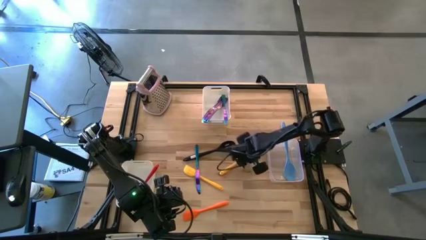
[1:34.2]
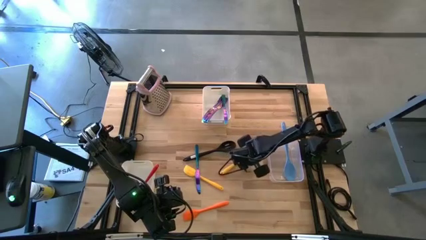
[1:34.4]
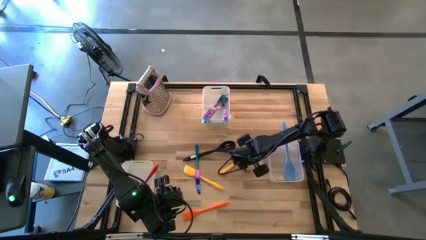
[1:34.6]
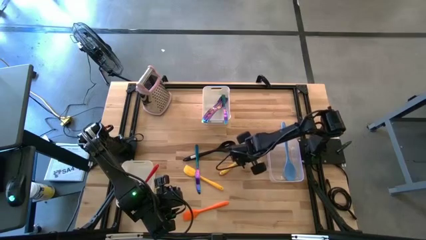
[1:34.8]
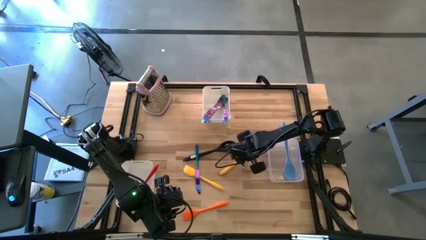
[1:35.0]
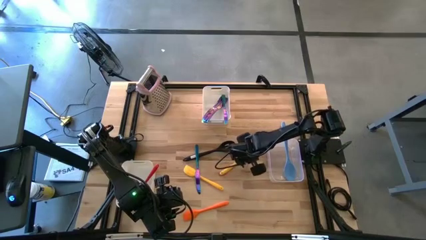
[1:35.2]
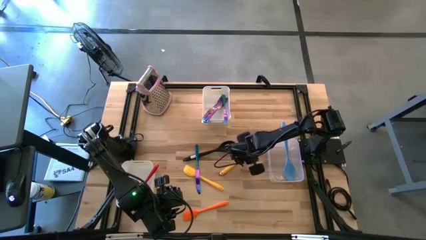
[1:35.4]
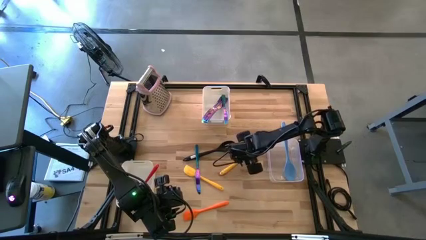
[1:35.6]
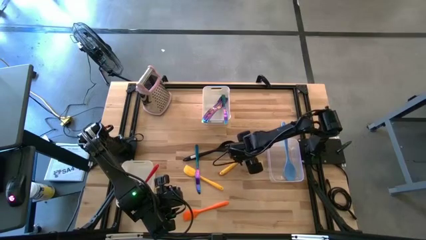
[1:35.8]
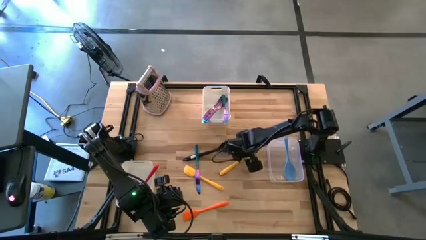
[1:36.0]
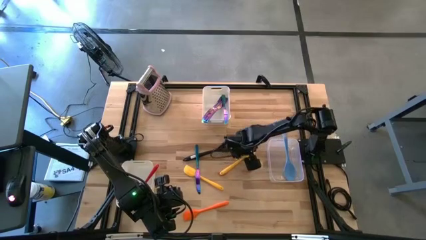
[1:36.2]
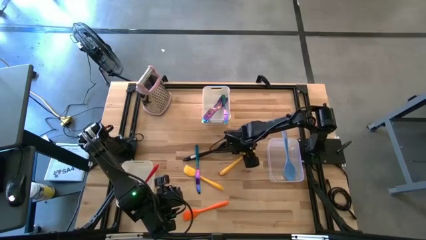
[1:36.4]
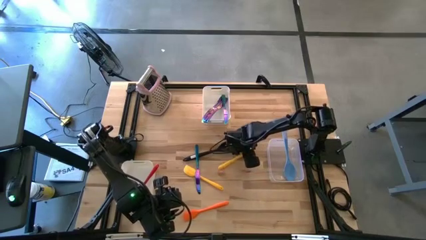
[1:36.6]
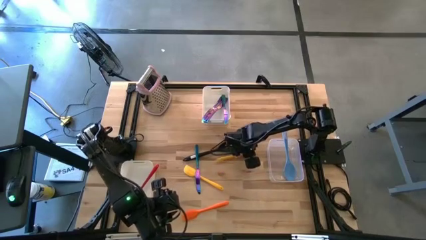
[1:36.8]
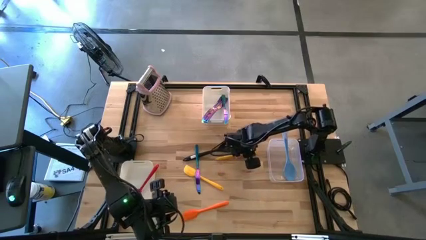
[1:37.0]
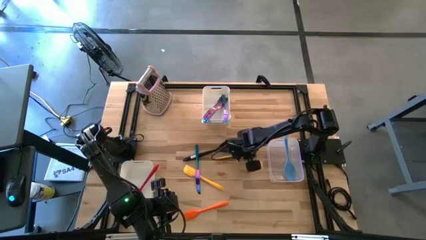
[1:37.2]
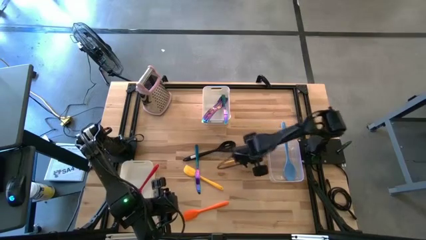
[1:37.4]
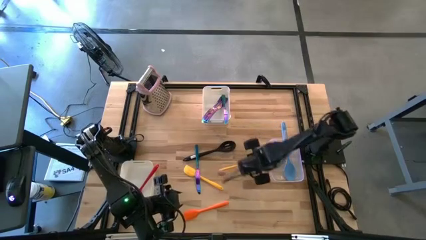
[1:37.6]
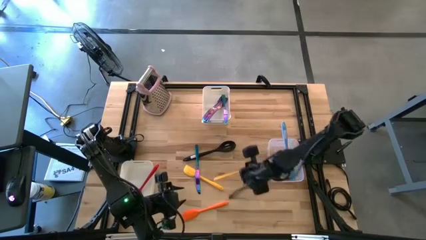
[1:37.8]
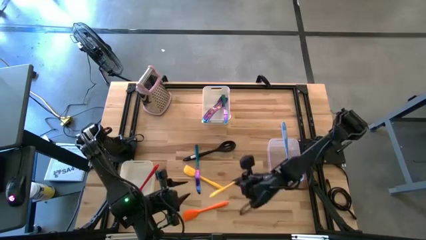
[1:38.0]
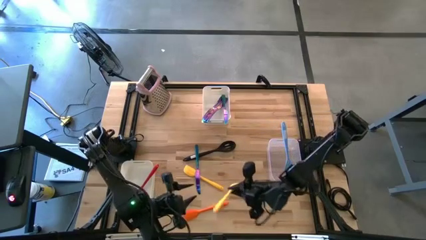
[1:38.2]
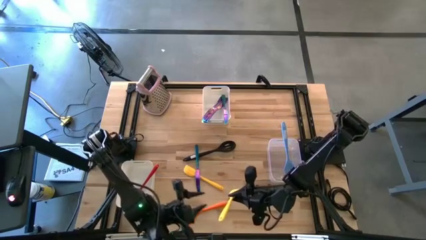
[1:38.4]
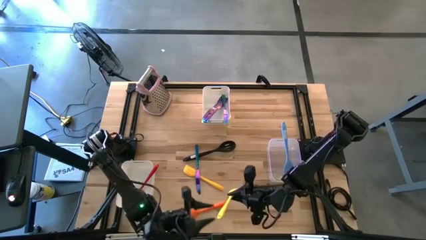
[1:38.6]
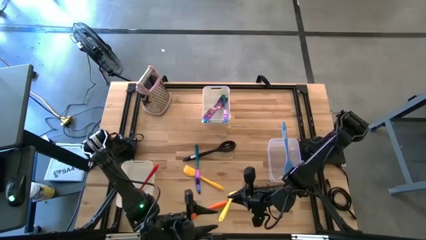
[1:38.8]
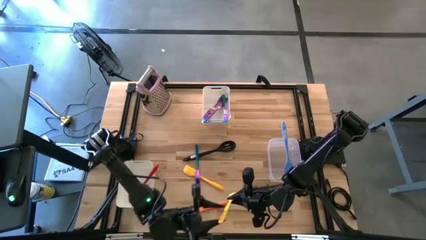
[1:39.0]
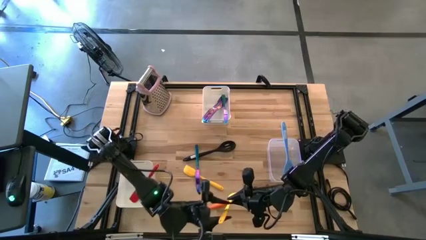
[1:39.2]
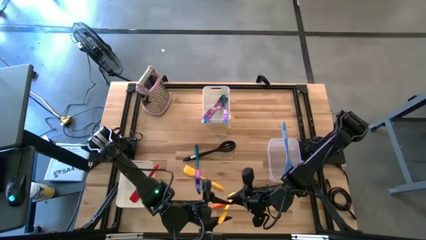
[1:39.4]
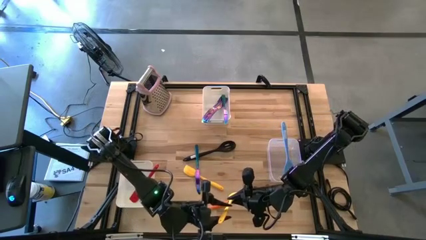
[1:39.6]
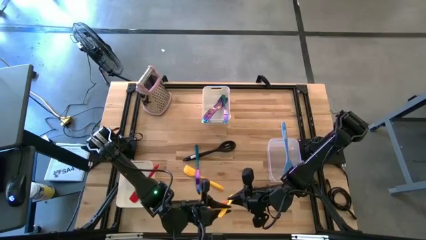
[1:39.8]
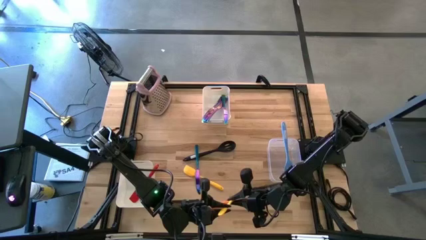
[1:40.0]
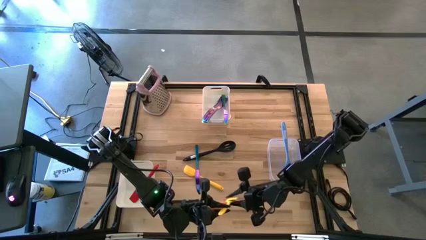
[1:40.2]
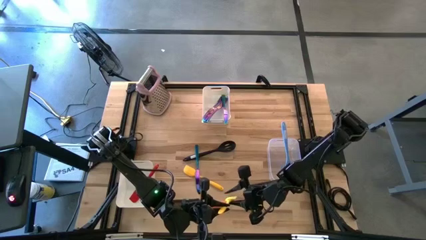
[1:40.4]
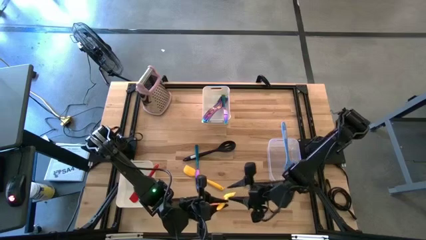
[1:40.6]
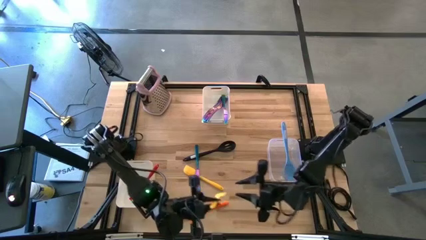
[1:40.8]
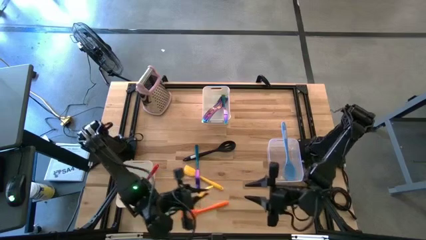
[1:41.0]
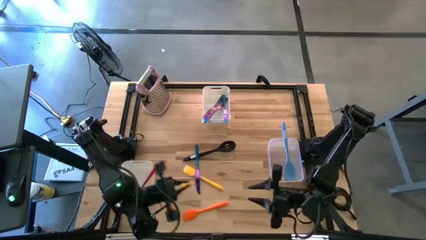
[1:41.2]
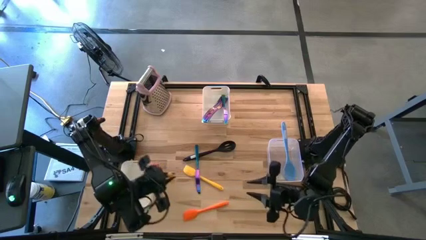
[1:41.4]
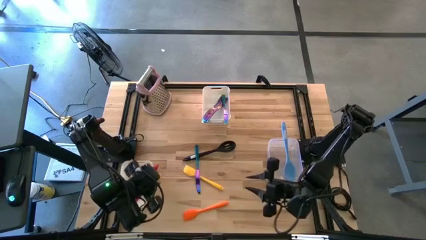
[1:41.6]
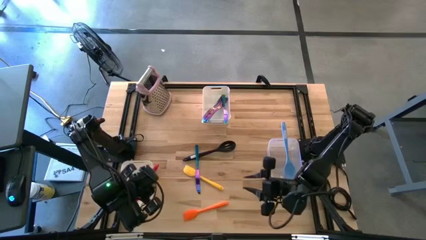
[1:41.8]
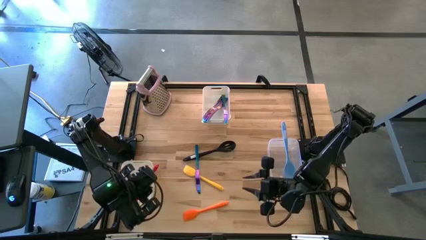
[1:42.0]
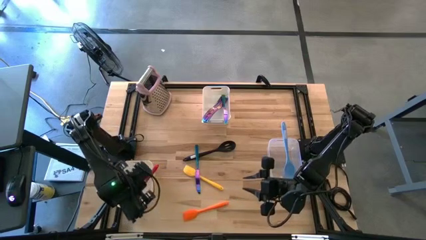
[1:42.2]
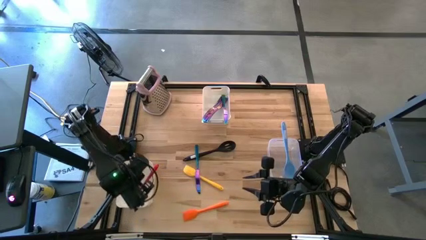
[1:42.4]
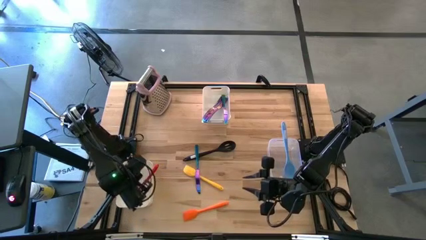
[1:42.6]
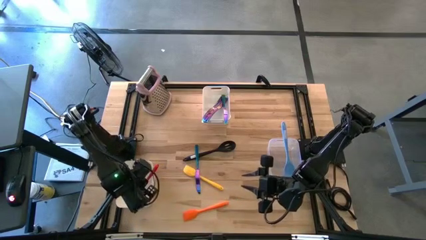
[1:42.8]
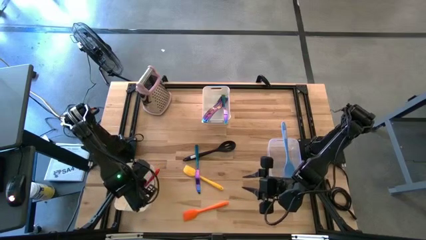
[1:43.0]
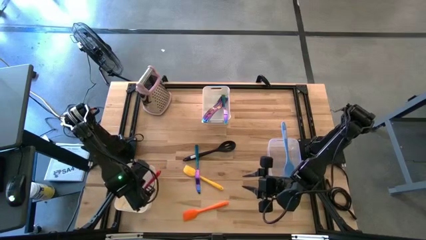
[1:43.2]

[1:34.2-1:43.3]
Task: Pick & Place Kitchen Items
Put the yellow spatula into the left white bin

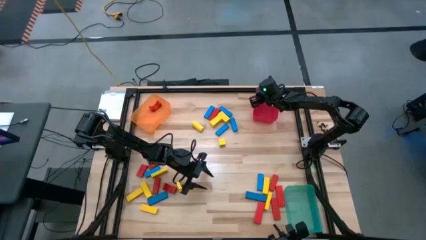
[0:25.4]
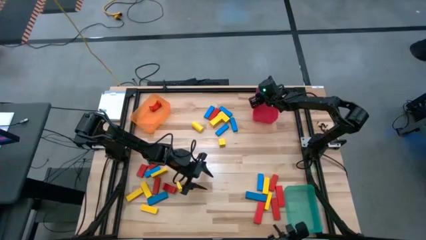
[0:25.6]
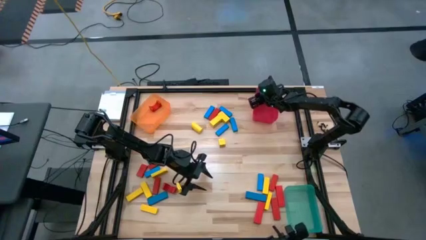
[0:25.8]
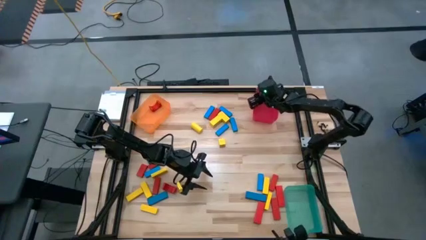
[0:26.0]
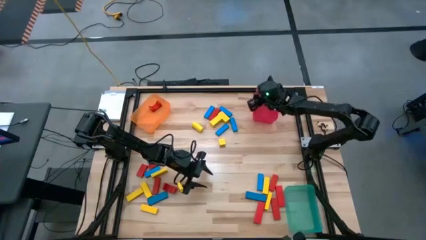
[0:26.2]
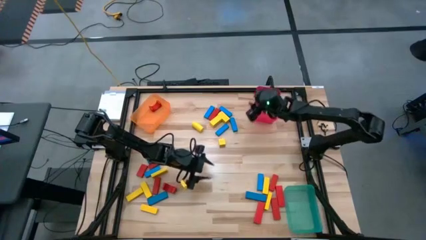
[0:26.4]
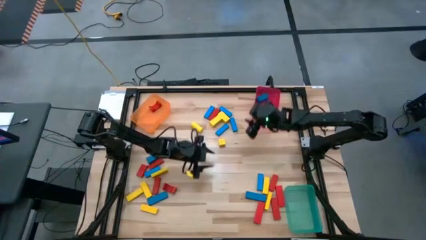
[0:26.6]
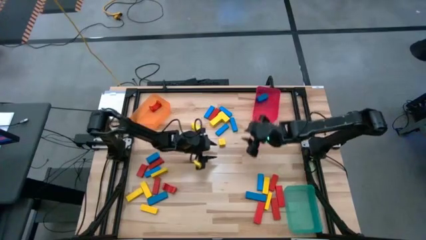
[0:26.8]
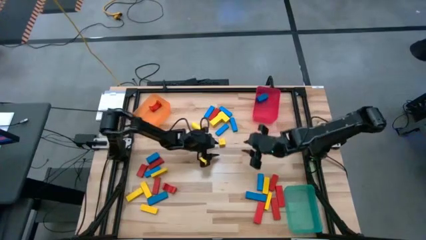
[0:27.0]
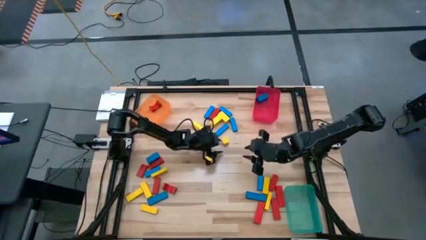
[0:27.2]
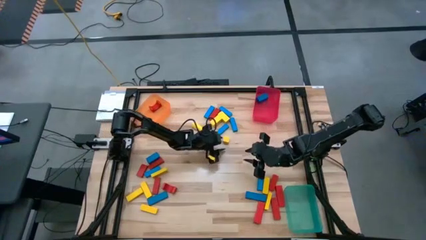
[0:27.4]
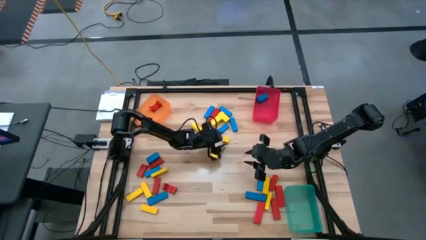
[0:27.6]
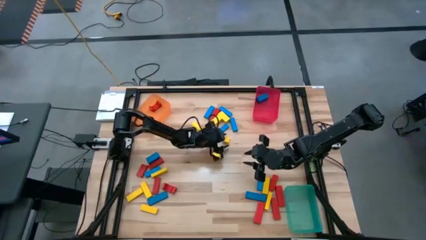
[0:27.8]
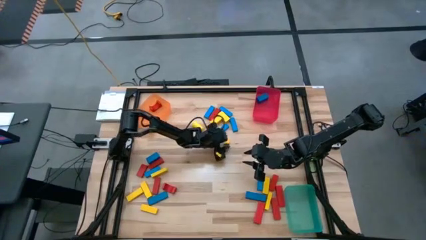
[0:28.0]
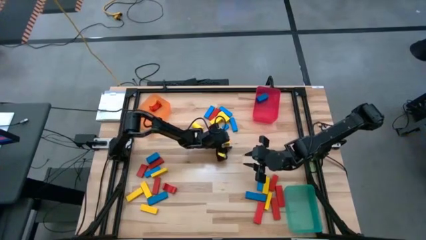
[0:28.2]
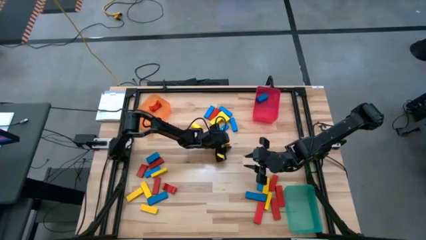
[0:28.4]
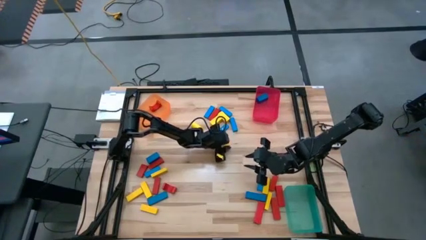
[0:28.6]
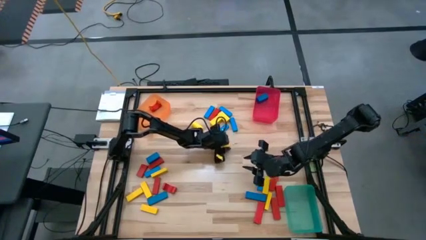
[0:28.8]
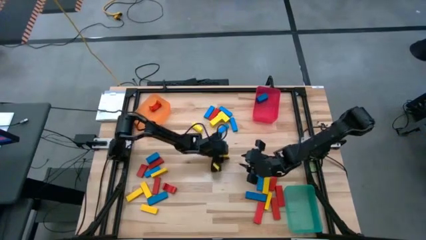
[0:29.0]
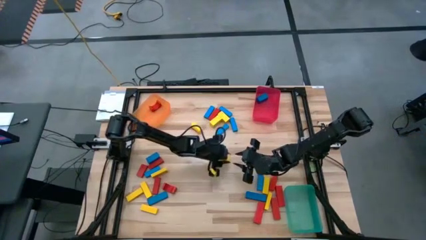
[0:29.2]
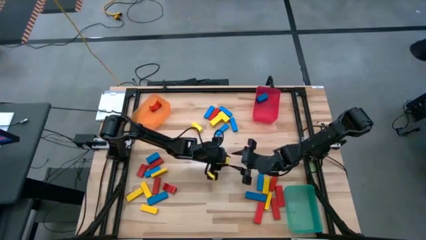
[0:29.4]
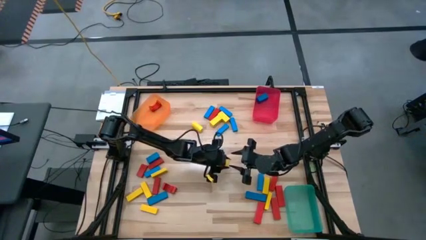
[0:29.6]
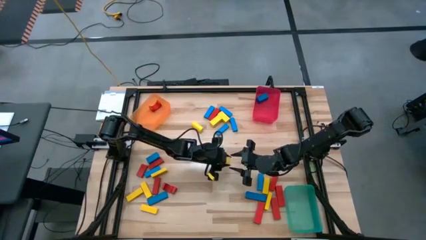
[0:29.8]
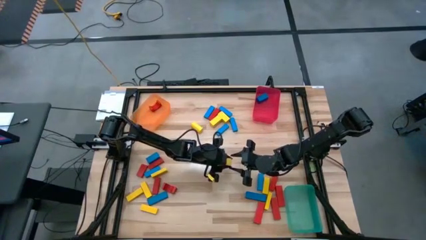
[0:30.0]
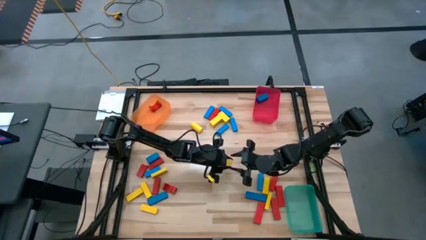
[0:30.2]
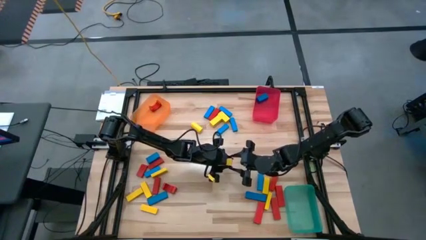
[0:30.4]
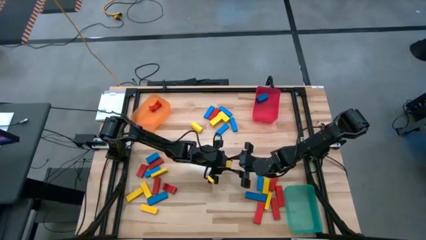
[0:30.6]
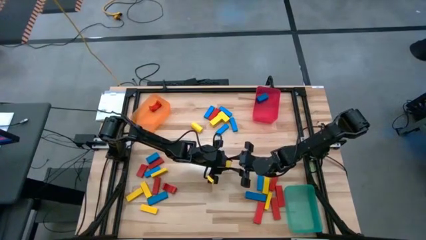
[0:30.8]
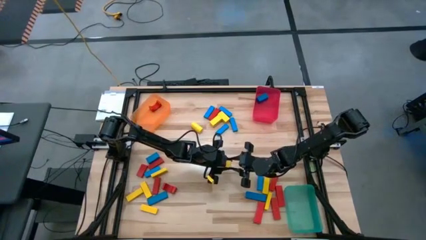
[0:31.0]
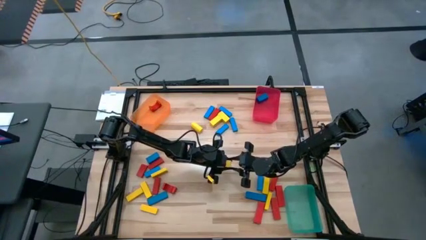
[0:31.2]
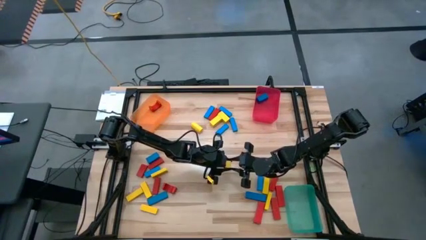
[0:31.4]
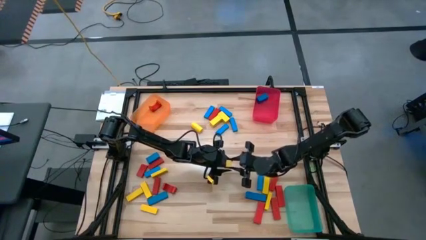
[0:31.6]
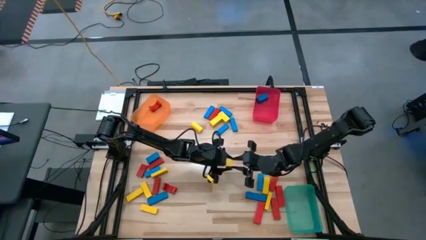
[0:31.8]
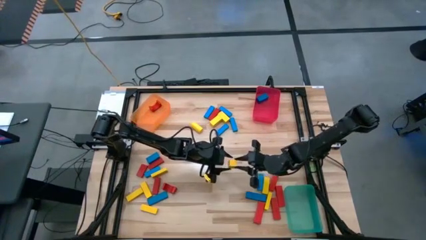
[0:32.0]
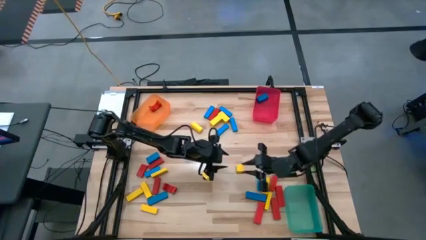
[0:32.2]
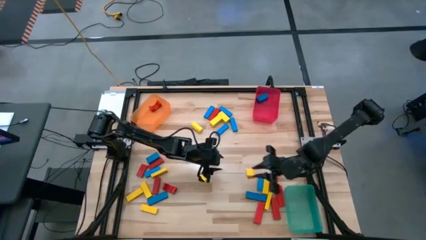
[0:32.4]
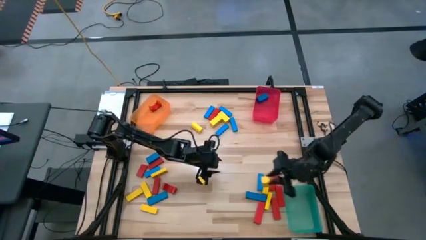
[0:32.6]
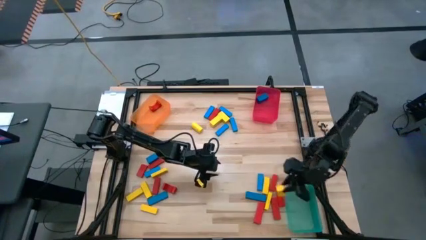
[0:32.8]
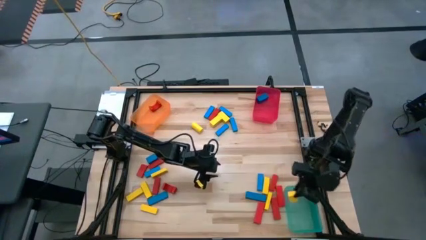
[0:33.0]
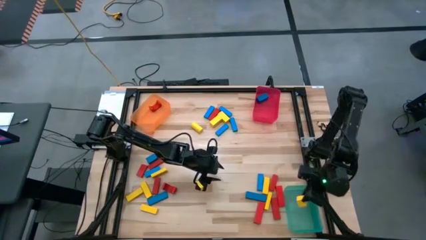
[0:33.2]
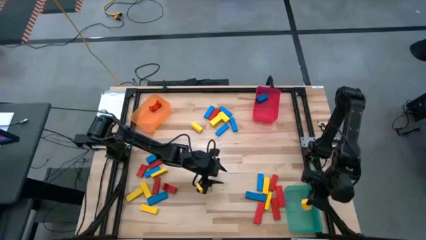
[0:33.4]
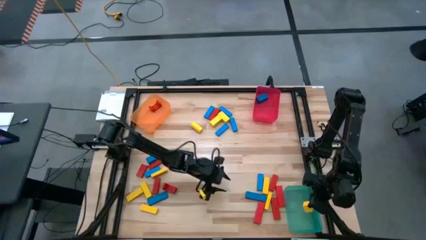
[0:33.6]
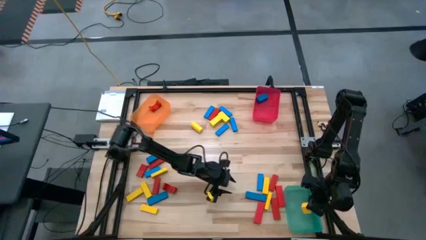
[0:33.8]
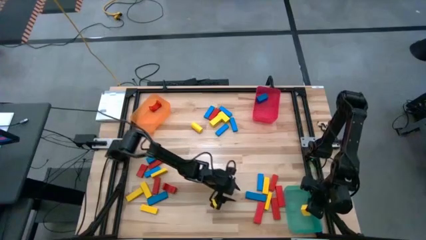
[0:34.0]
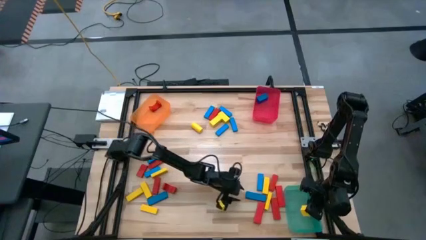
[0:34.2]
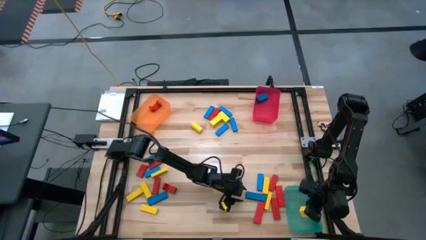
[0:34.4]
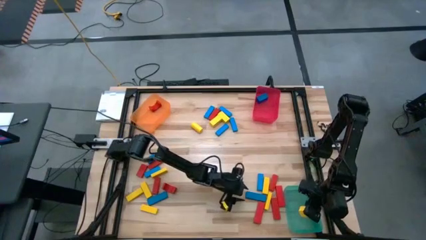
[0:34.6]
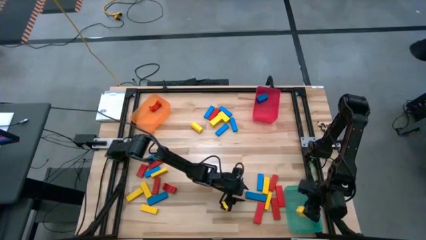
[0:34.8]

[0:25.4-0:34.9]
Task: Sort blocks
Put the yellow block into the green bin
